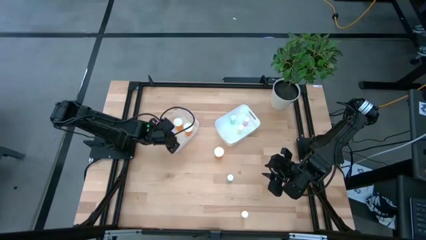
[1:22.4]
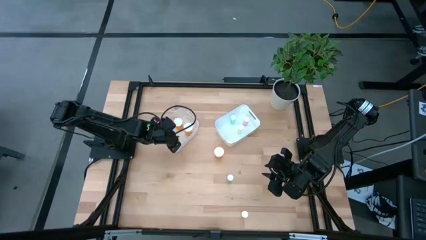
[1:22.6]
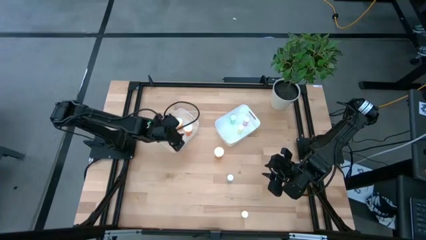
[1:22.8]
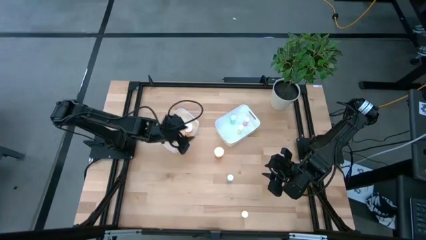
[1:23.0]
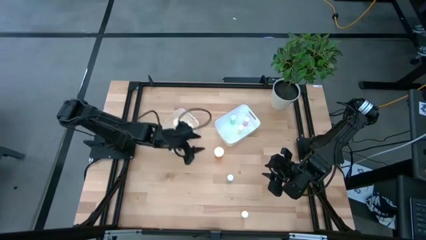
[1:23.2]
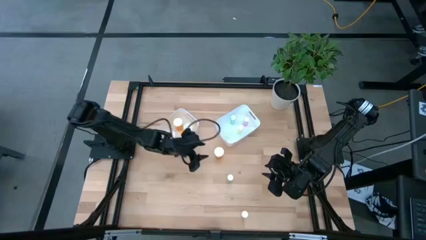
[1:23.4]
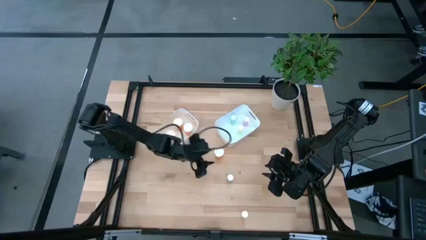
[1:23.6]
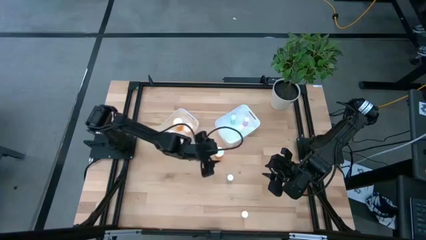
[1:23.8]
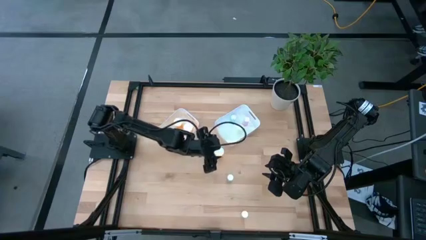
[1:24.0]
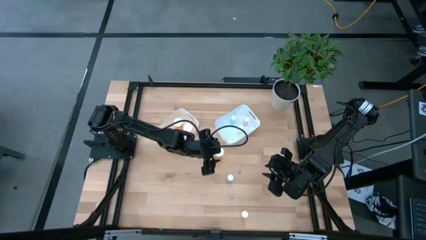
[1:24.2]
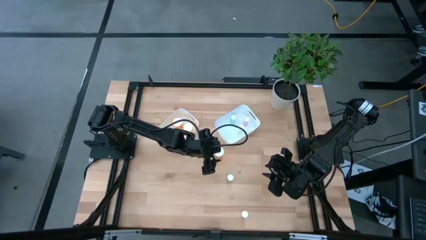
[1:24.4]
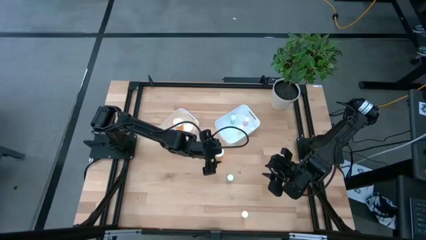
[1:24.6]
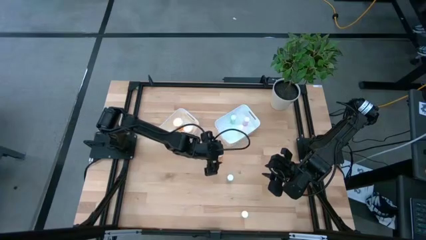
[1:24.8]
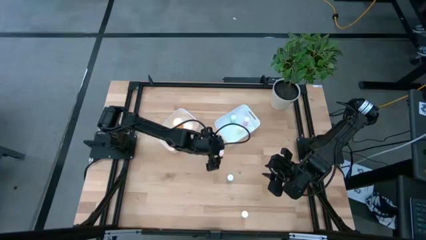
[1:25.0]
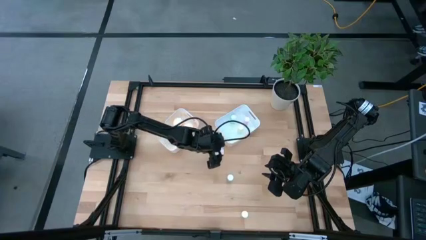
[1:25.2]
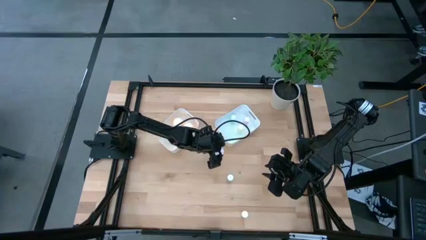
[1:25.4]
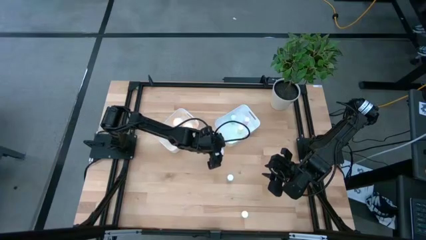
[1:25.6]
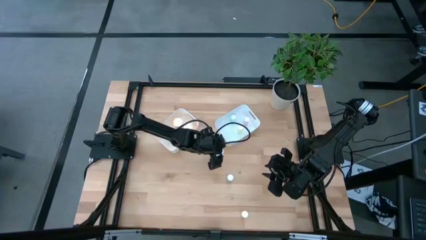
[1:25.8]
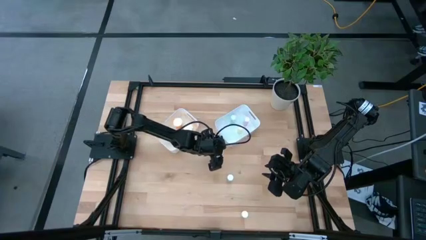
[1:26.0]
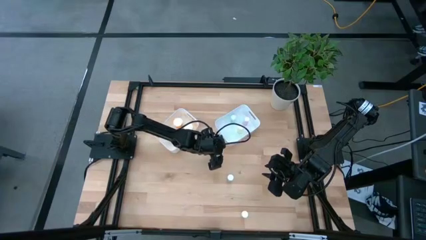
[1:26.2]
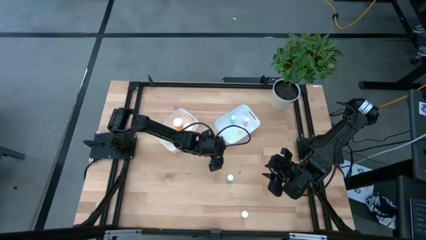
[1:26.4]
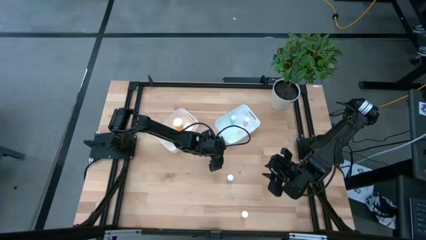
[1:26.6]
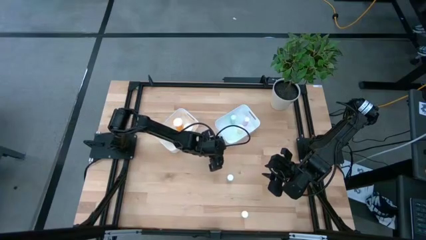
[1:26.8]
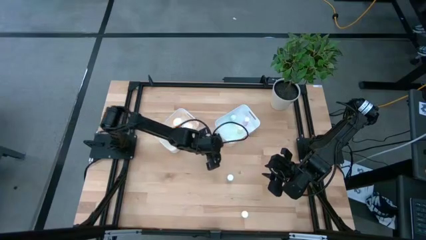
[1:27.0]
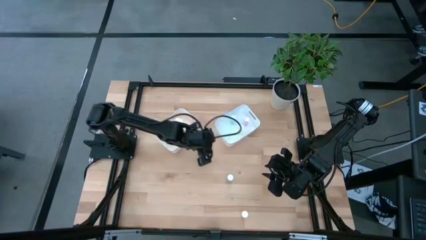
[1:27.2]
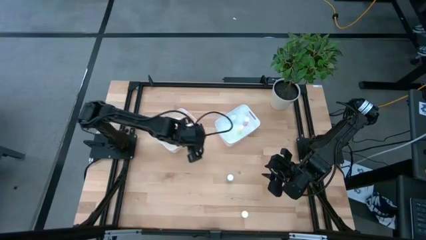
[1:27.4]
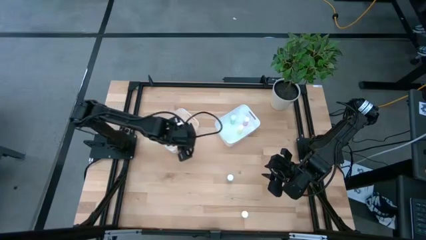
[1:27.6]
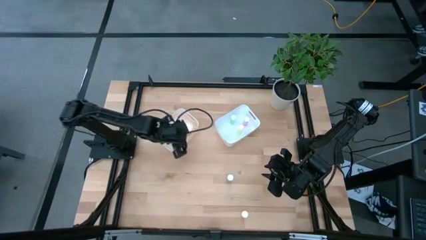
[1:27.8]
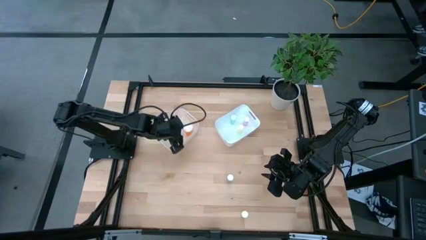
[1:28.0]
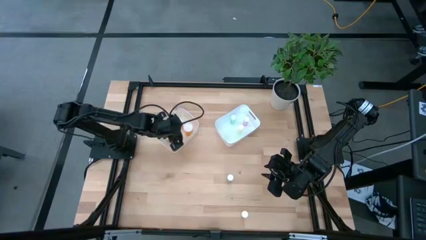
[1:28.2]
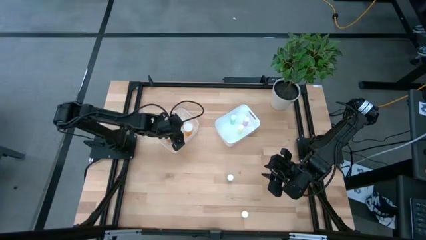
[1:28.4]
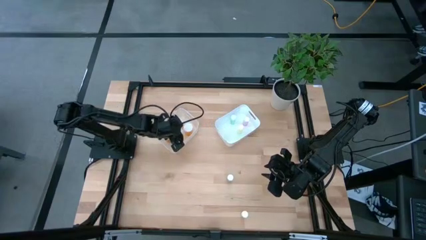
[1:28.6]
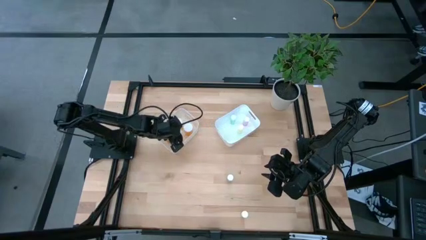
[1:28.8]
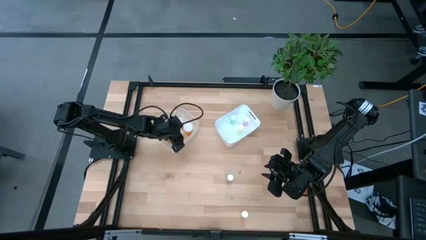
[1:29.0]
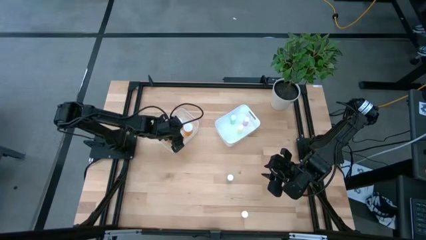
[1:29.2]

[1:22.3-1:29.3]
Task: Pick and place medicine bottles into bin by pill shape (circle, oval)
Put the orange capsule bottle into the left white bin

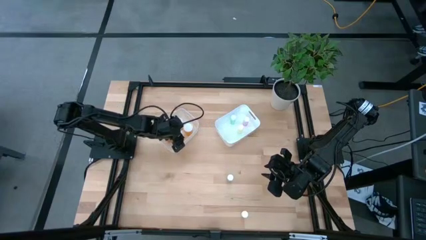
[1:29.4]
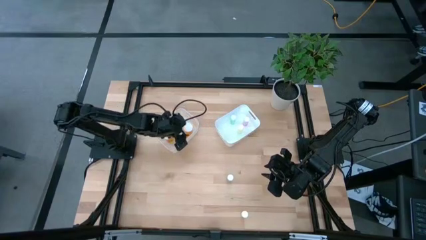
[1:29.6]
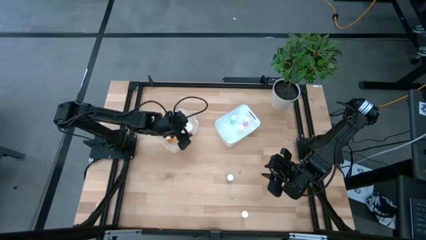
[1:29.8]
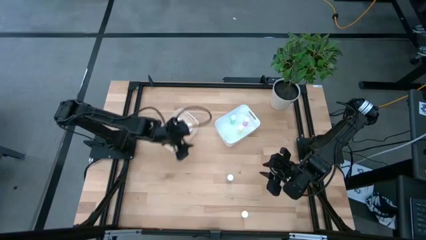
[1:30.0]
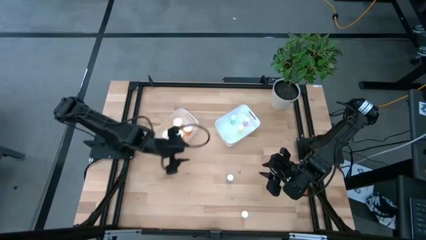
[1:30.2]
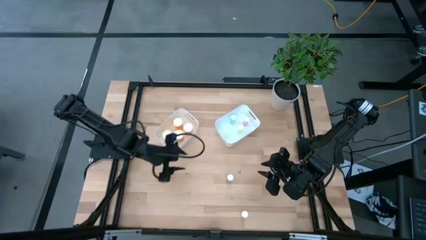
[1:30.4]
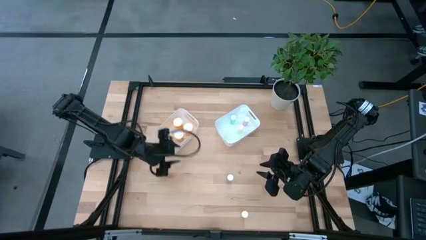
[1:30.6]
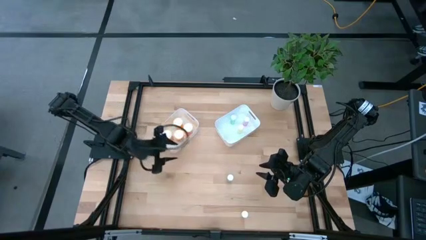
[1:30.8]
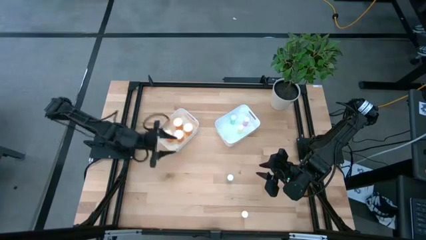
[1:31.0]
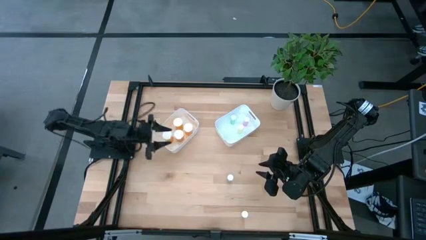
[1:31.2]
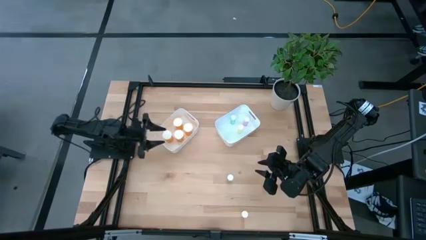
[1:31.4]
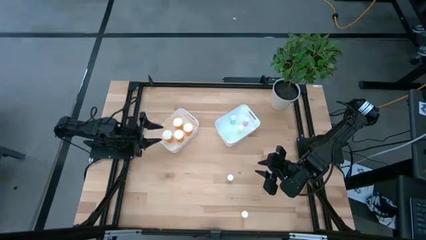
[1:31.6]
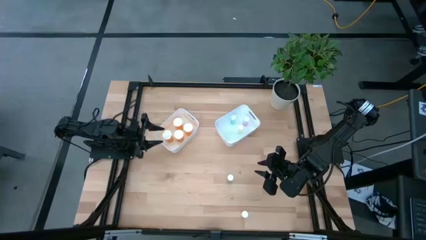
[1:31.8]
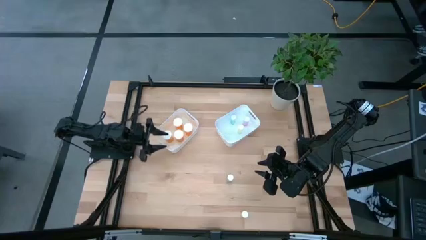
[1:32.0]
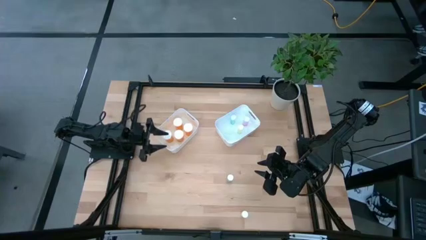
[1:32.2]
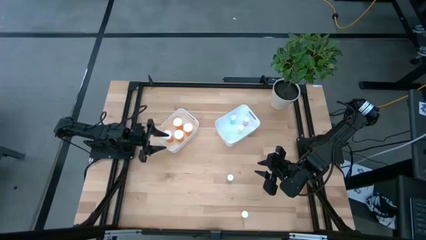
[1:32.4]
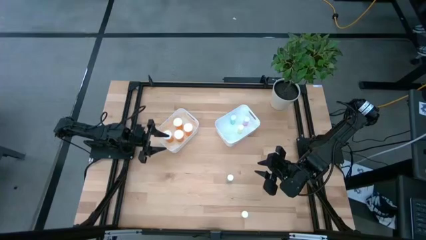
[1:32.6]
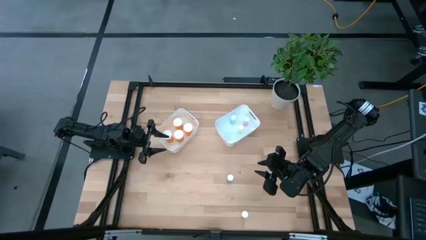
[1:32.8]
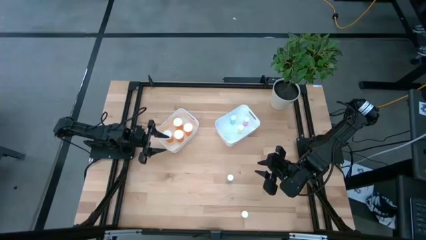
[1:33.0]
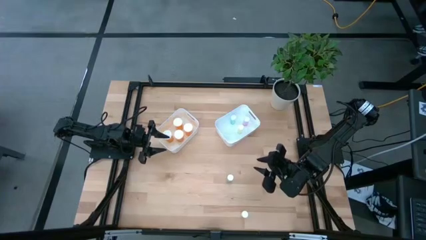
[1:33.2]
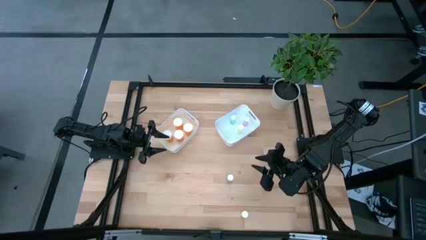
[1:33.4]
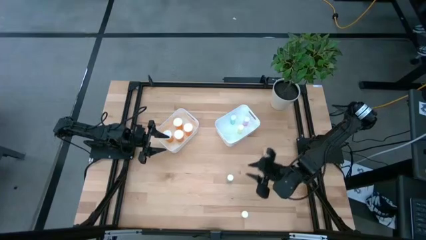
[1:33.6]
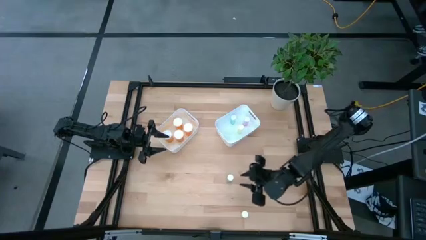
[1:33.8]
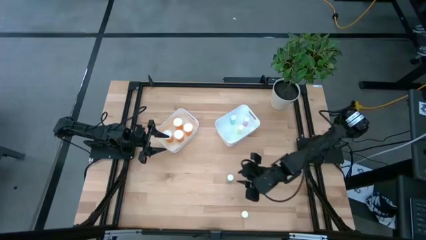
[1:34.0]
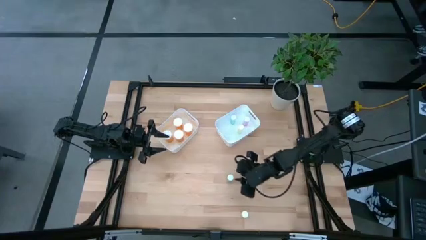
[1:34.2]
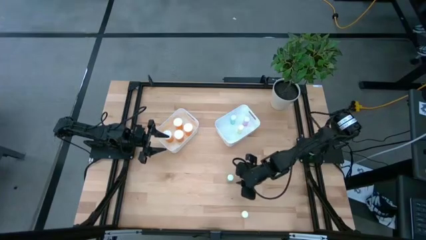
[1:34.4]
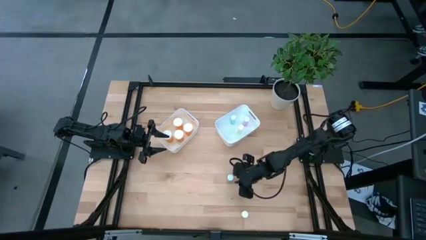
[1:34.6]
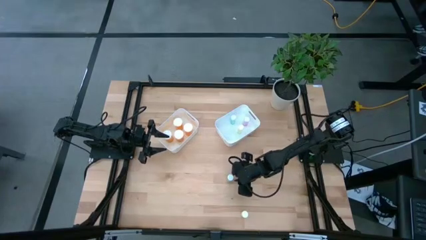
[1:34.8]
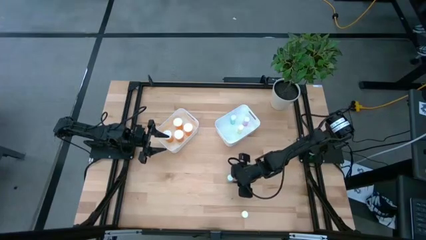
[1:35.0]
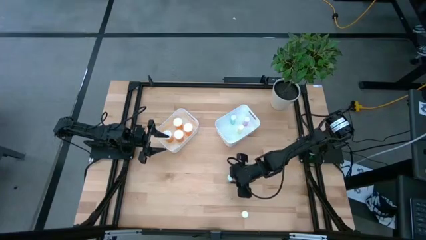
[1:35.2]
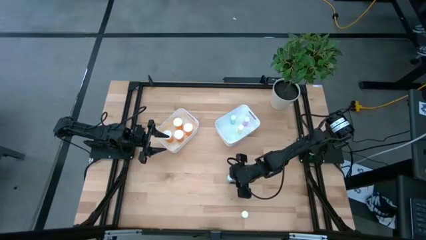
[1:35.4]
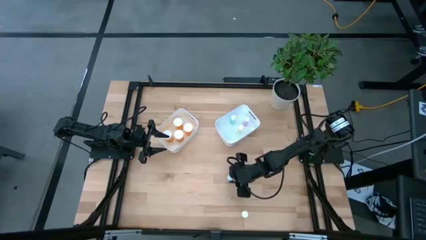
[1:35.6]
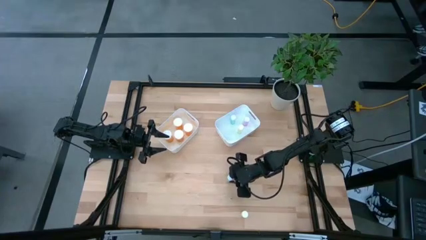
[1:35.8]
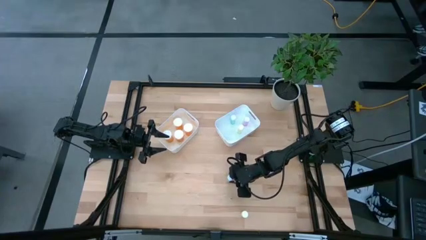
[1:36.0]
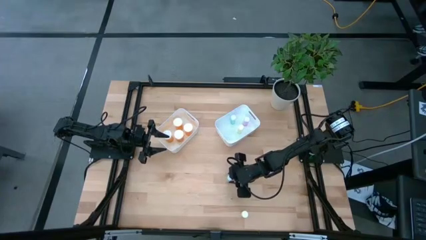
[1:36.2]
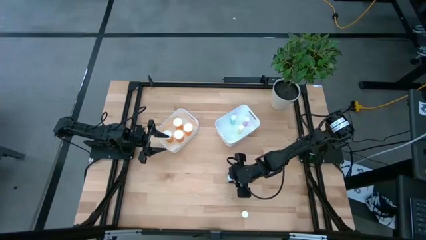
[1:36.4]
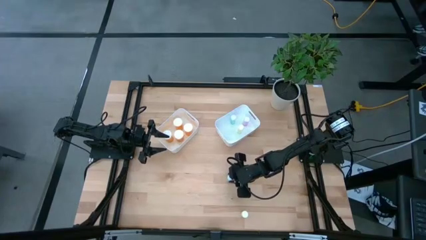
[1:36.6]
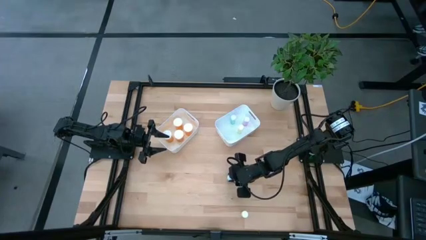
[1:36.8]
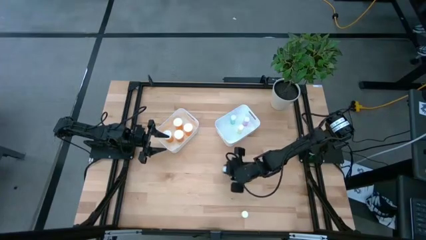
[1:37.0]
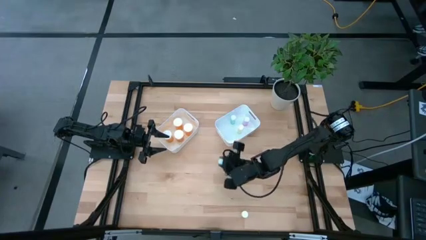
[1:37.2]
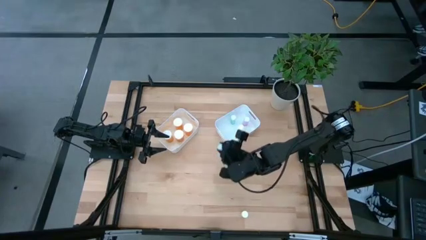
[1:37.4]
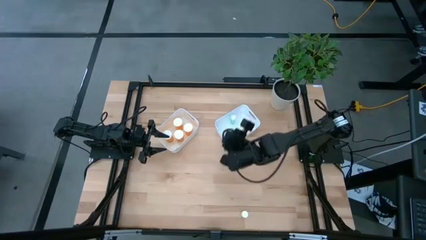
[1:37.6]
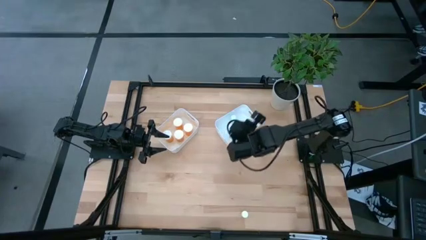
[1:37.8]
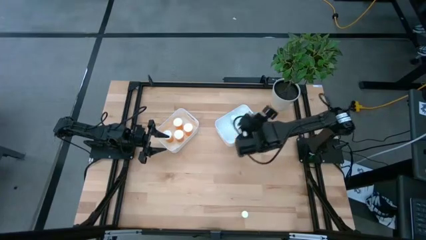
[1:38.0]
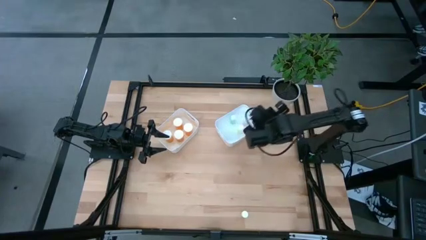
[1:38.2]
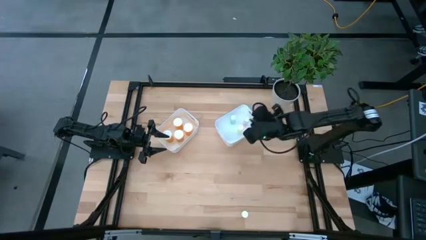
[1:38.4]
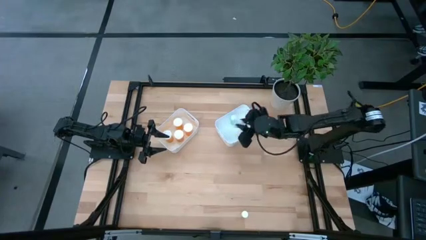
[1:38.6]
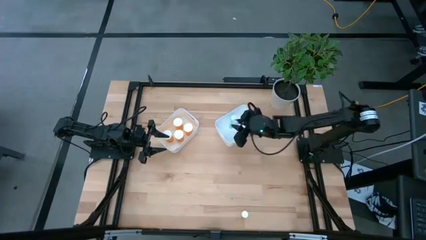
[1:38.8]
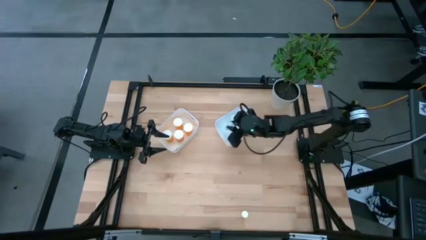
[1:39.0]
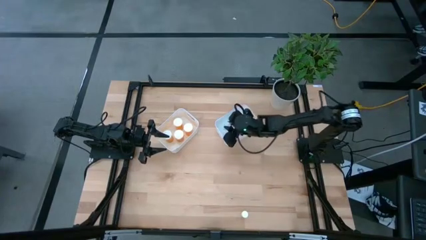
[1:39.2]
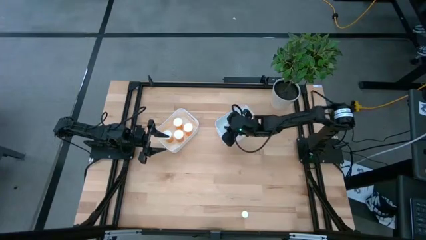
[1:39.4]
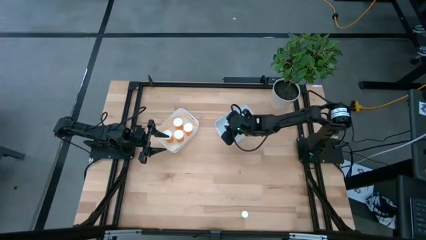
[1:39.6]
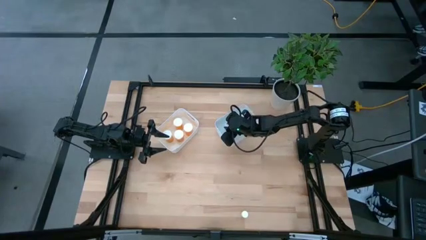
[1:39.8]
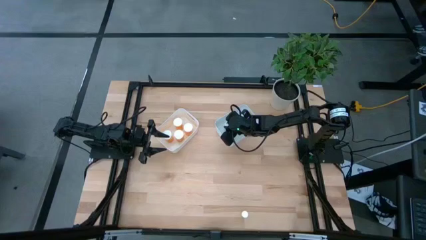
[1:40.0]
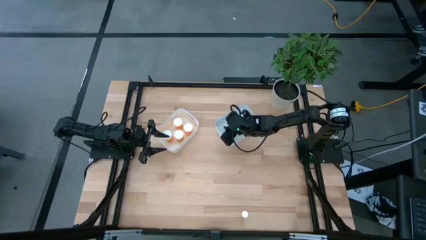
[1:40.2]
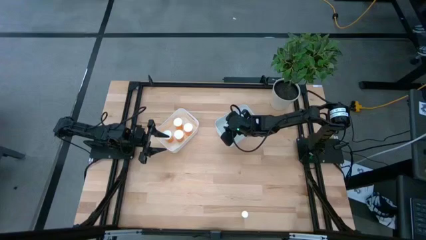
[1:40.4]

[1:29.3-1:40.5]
Put the green tablet bottle into the right white bin
